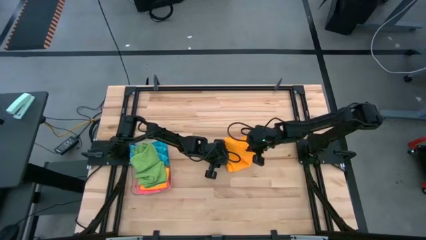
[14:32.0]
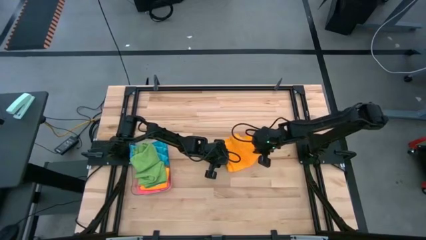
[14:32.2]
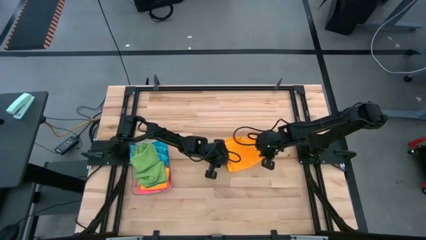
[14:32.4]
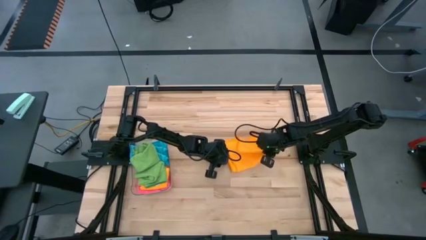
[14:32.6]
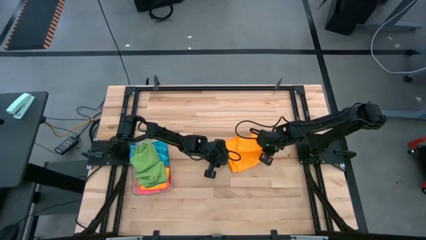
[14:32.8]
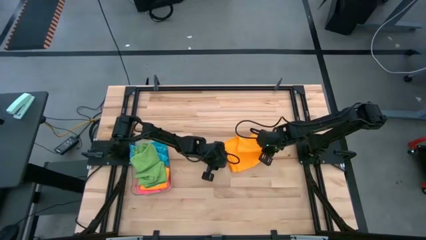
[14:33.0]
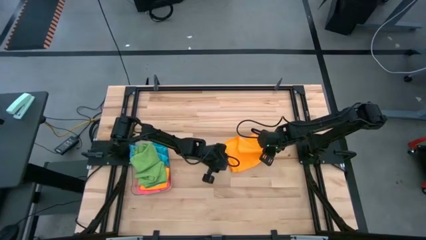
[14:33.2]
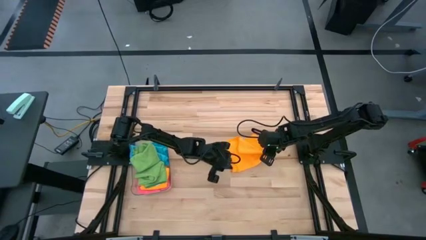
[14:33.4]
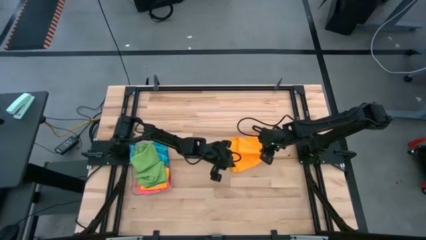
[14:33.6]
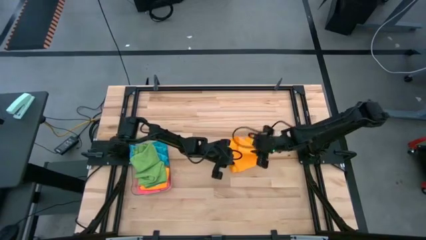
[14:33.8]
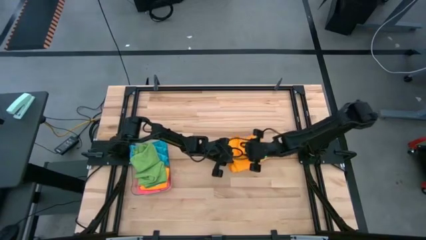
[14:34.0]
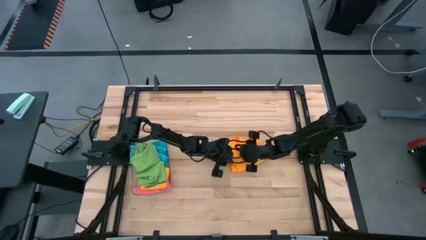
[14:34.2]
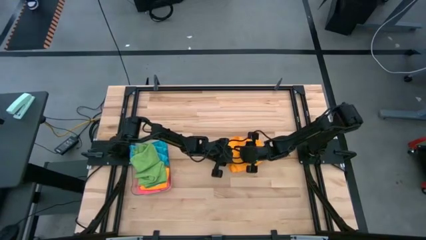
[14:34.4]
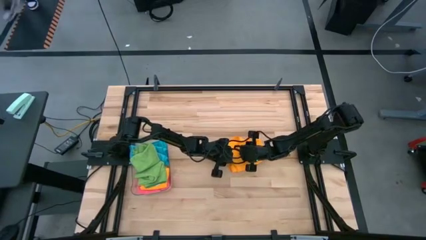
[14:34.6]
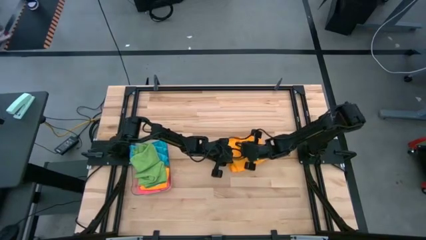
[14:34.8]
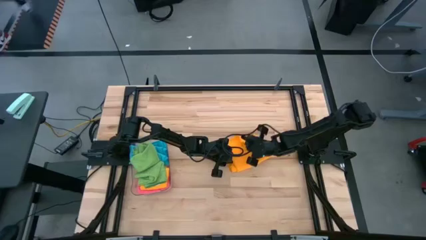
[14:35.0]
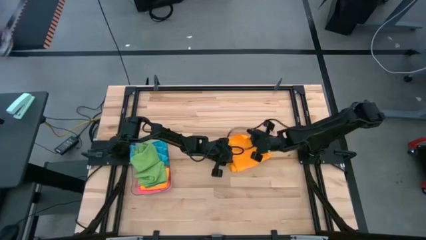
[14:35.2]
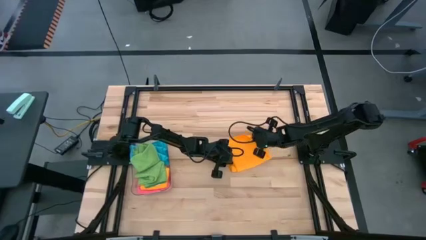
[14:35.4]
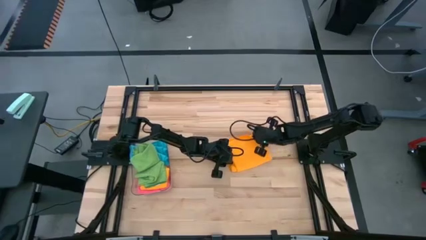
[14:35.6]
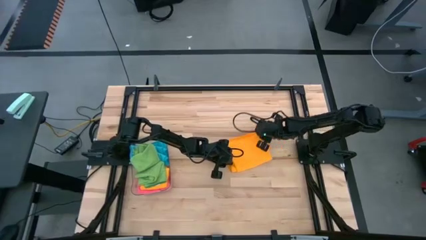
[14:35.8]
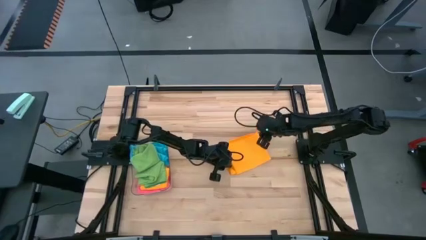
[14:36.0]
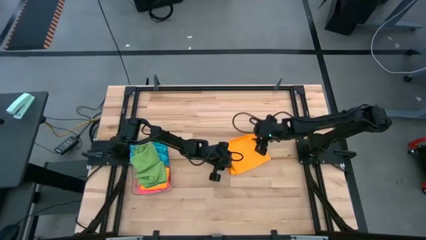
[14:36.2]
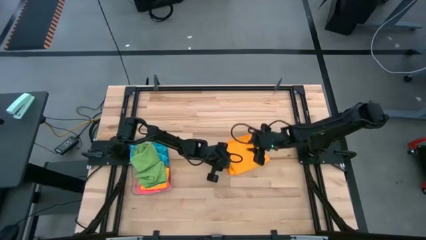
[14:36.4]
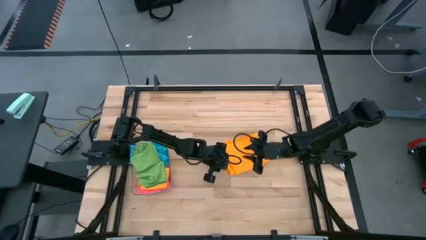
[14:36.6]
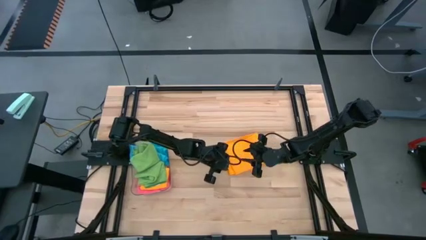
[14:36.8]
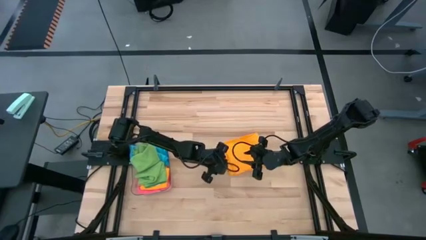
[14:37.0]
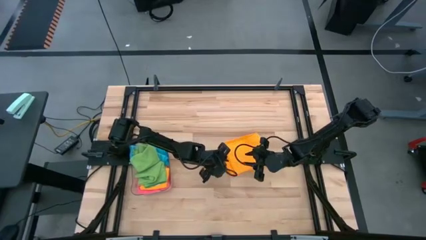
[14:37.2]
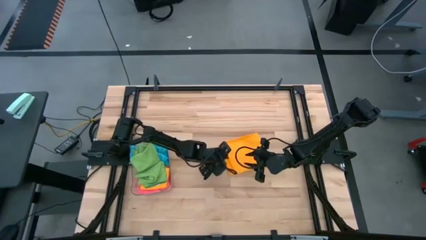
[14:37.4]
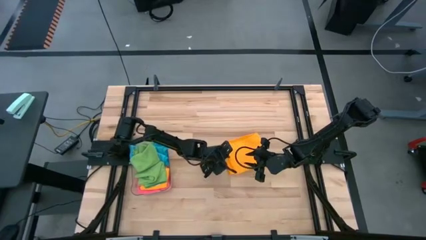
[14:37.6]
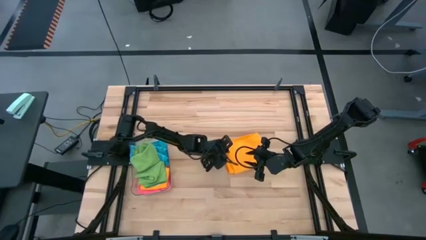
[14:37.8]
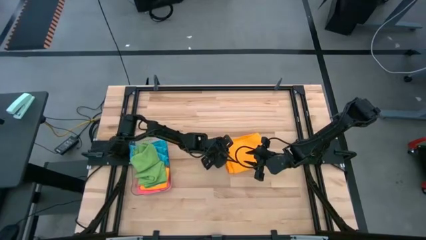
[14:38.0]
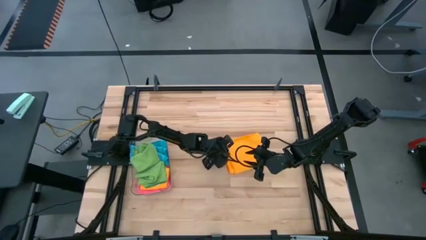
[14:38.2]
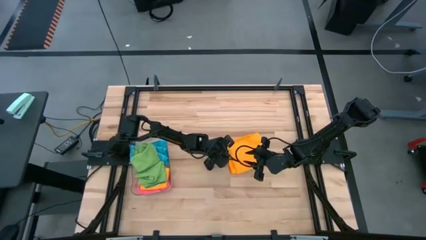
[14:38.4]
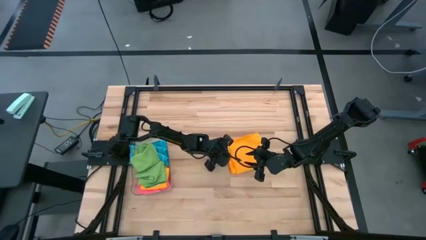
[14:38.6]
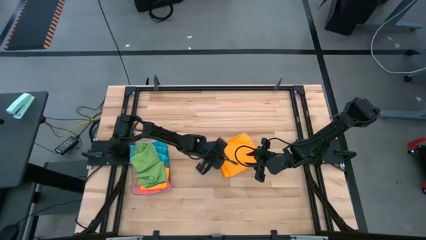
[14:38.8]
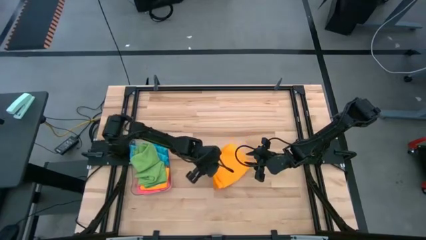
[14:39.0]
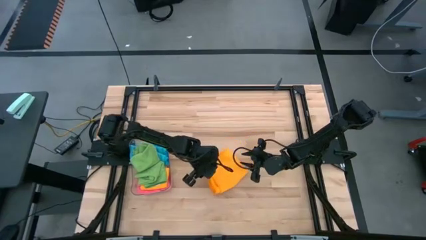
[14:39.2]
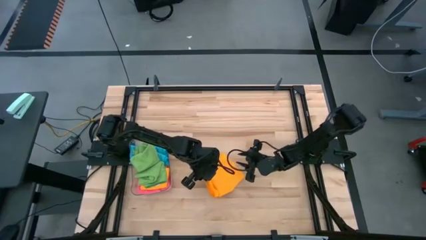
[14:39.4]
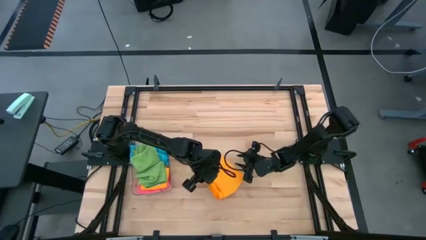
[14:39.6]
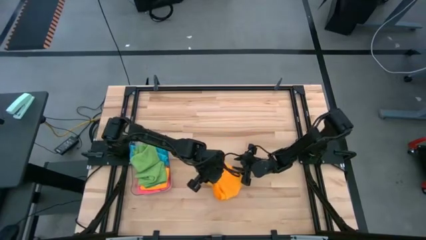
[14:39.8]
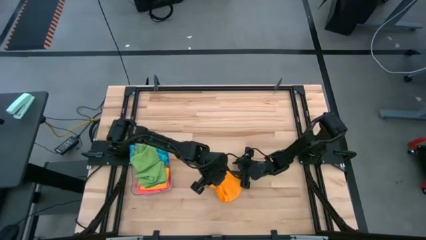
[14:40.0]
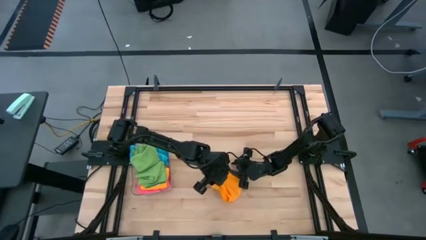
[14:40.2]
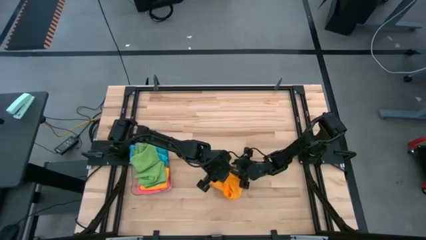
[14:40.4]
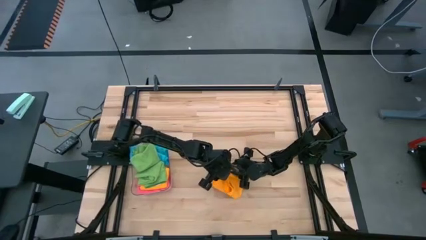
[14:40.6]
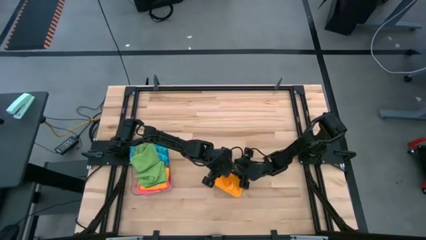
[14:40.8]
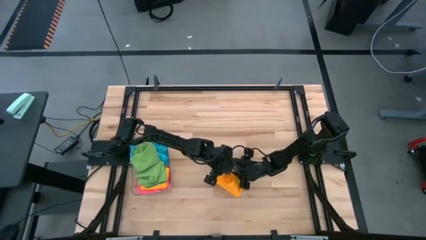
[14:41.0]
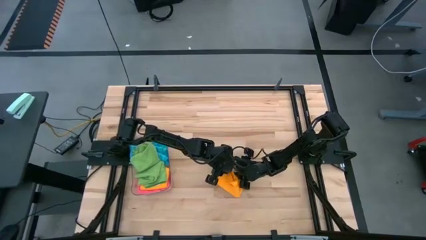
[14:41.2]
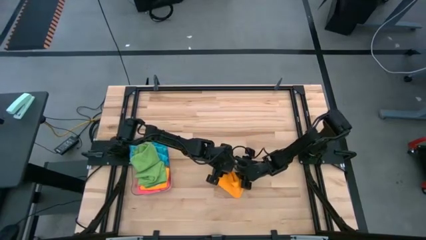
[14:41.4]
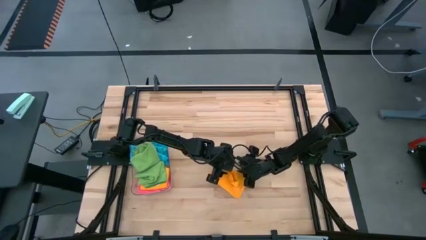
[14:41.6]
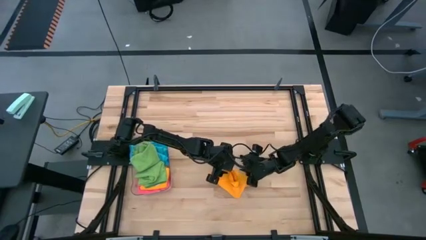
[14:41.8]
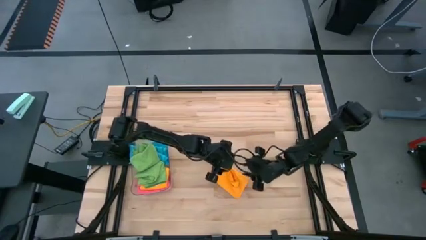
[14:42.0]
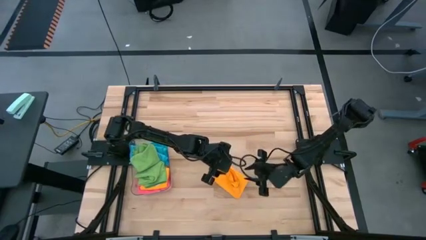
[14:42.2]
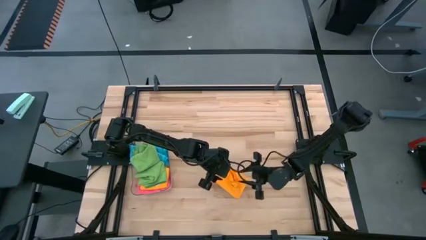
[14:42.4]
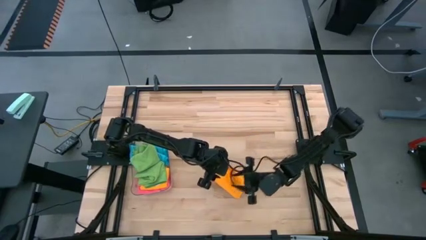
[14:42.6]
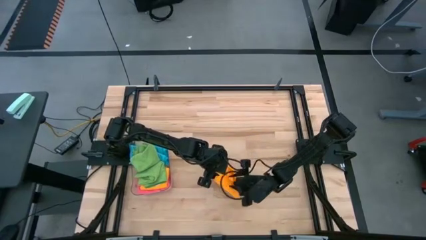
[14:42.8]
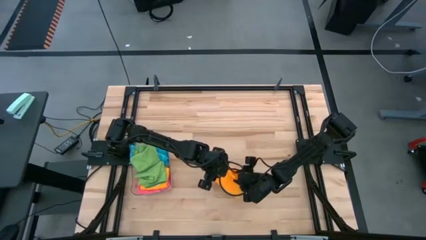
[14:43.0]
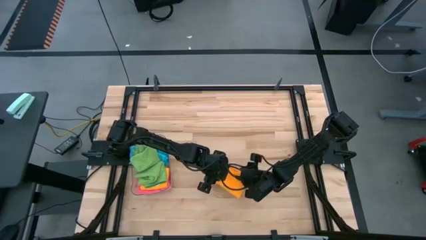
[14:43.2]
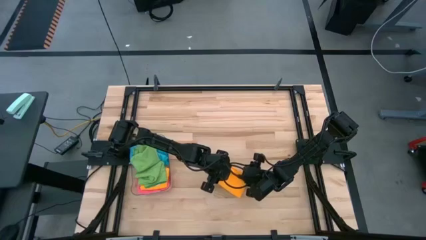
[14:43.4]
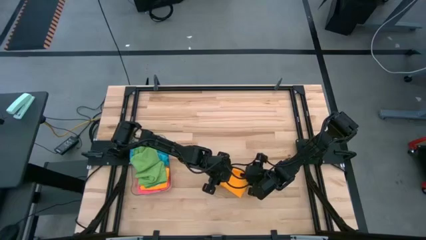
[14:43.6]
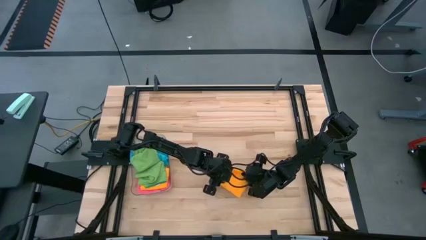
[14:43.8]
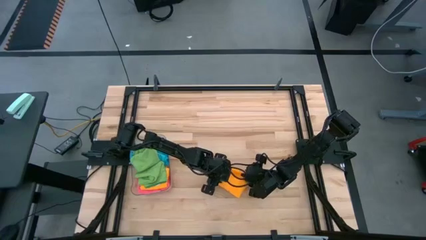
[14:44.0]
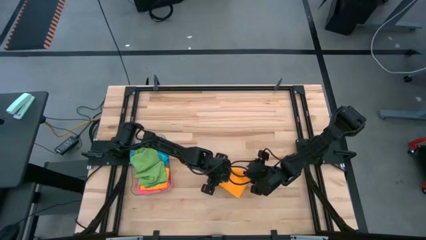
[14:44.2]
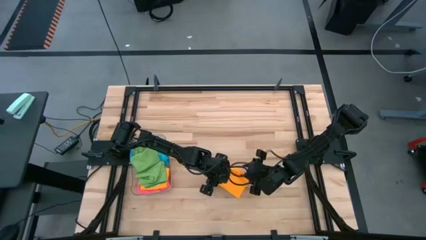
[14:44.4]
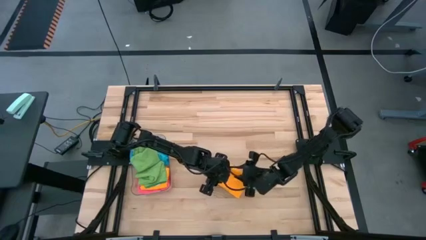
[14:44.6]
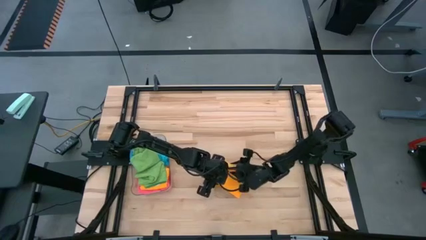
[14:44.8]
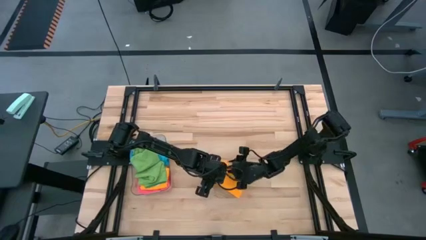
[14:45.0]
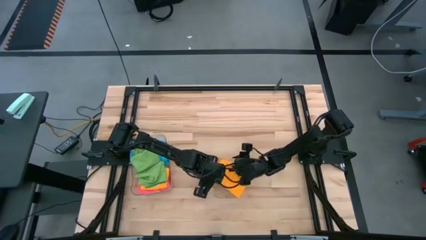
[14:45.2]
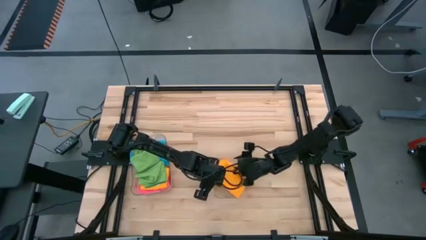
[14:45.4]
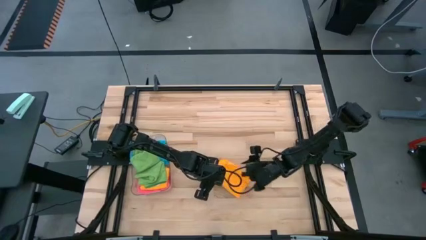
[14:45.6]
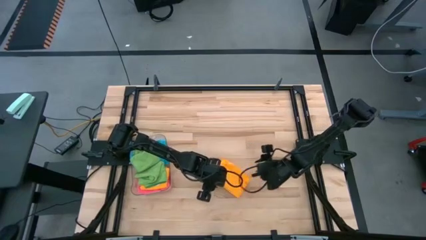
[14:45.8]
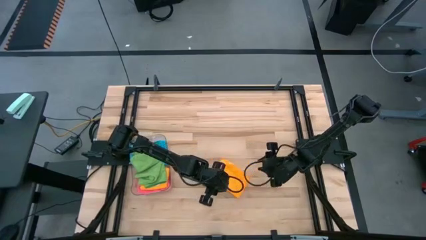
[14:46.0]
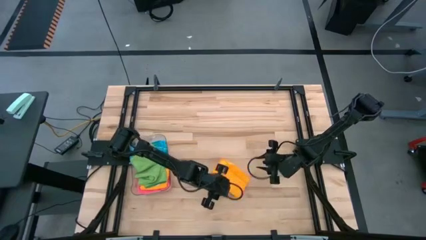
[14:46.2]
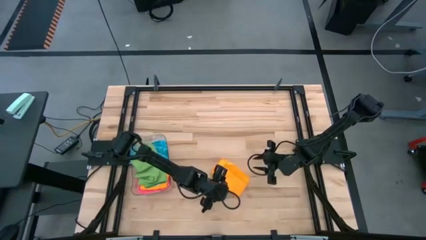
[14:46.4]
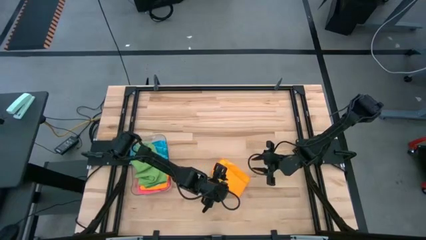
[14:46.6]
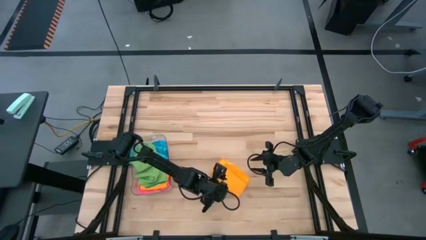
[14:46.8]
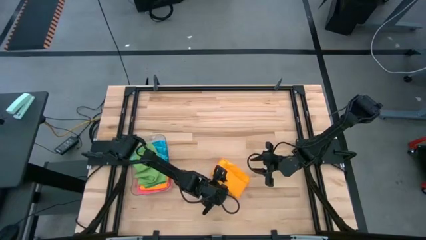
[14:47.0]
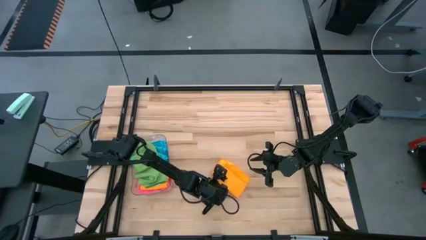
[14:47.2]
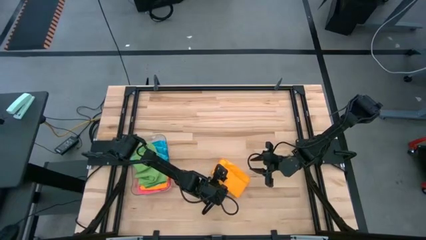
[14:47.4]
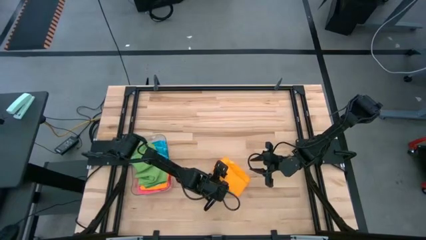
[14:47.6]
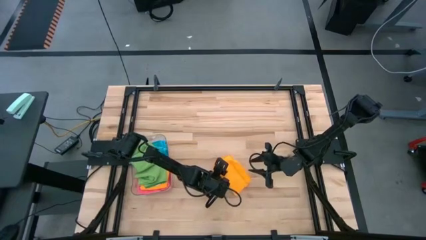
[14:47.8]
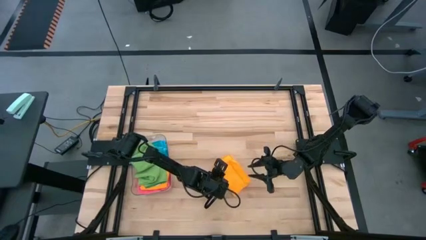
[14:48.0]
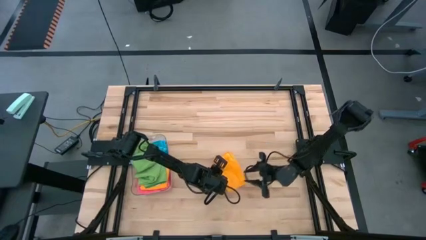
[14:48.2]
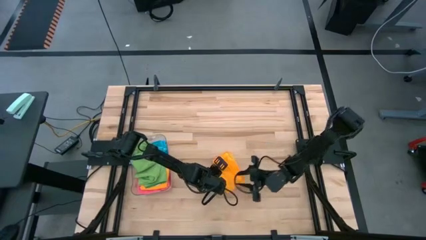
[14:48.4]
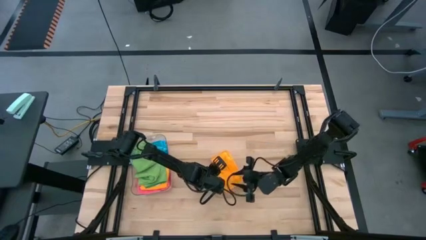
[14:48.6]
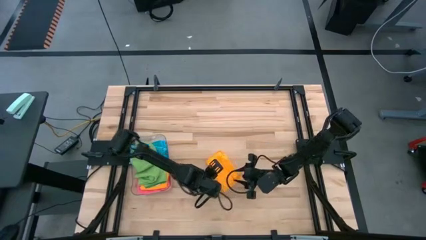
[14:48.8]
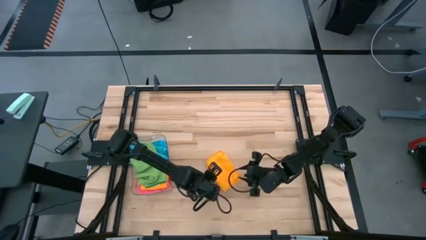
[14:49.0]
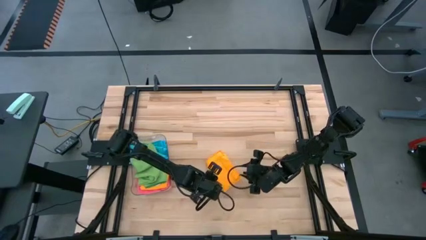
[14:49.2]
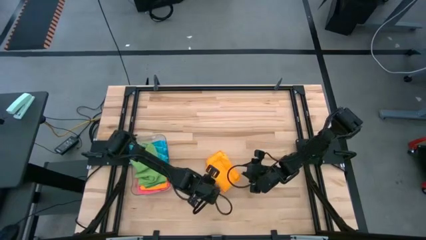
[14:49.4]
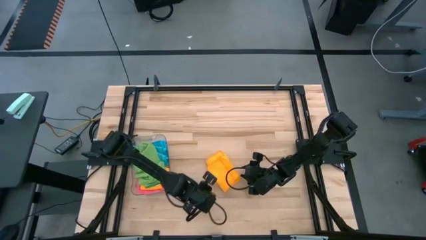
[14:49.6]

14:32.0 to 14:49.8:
Task: Fold microfiber towels
Fold the yellow microfiber cloth
